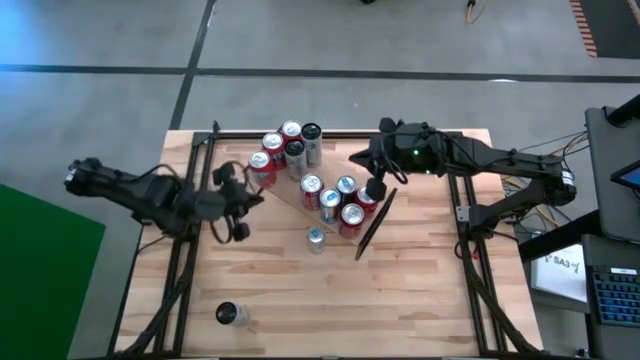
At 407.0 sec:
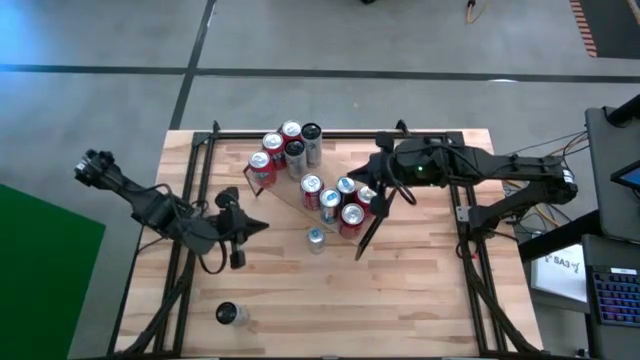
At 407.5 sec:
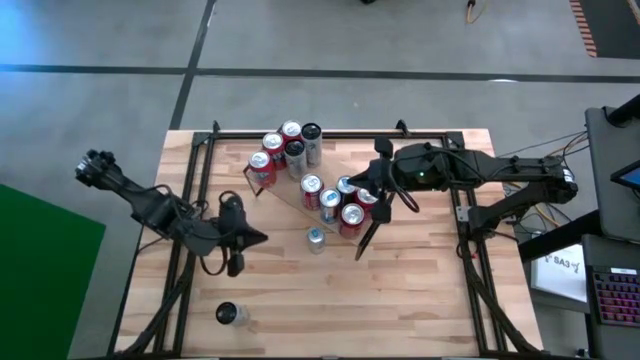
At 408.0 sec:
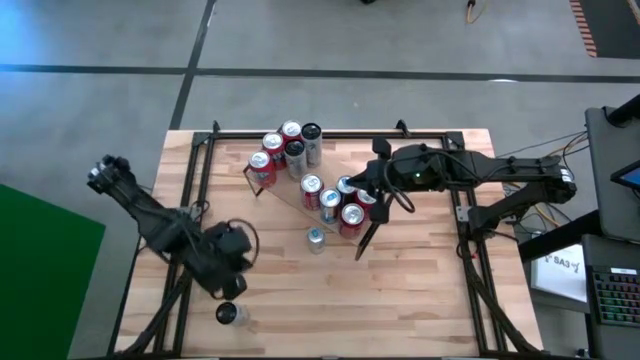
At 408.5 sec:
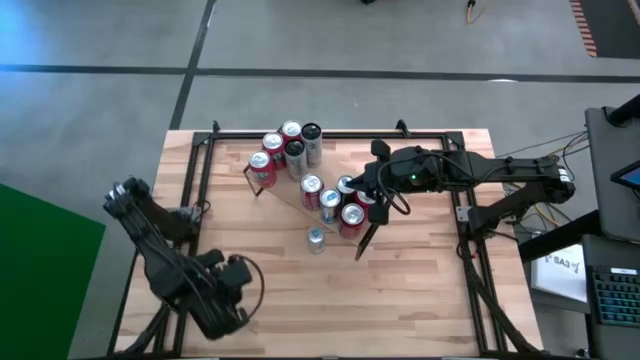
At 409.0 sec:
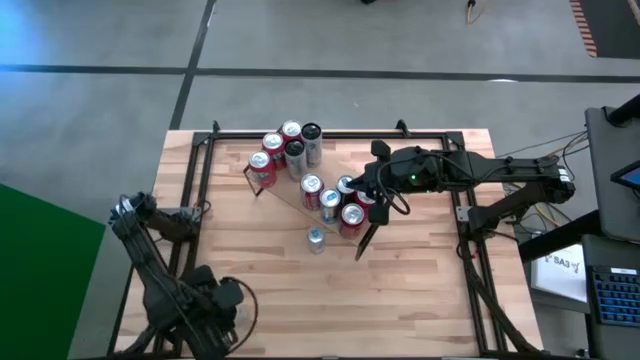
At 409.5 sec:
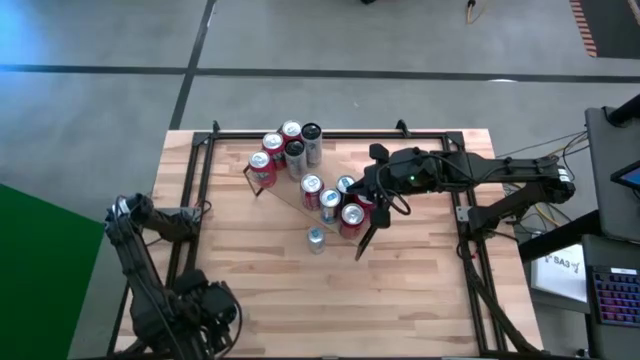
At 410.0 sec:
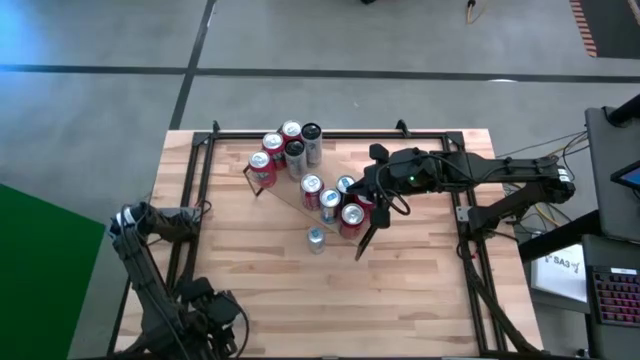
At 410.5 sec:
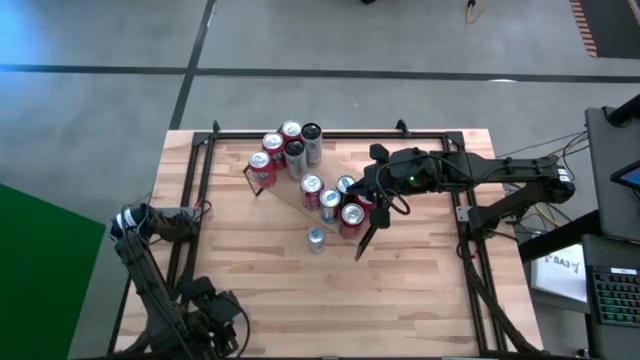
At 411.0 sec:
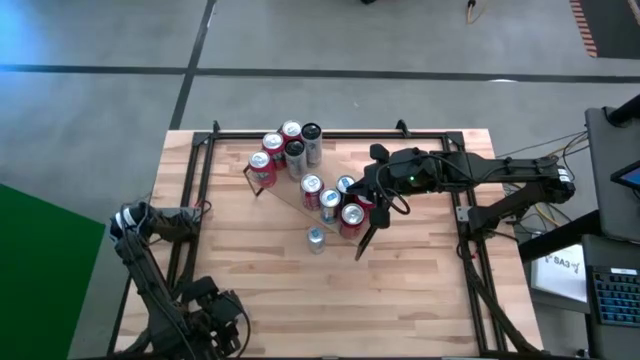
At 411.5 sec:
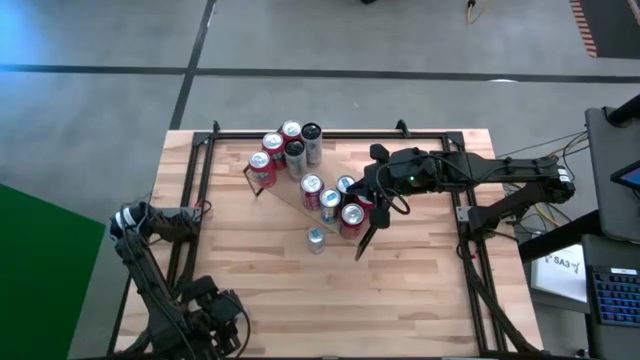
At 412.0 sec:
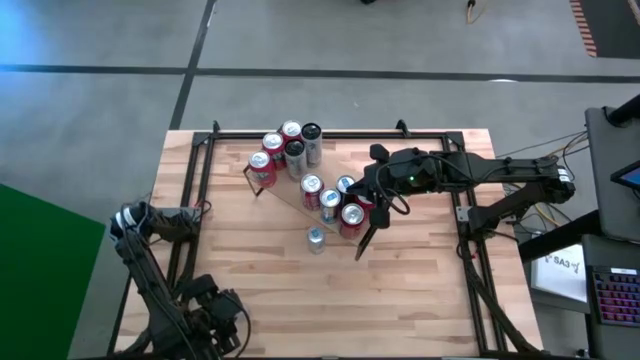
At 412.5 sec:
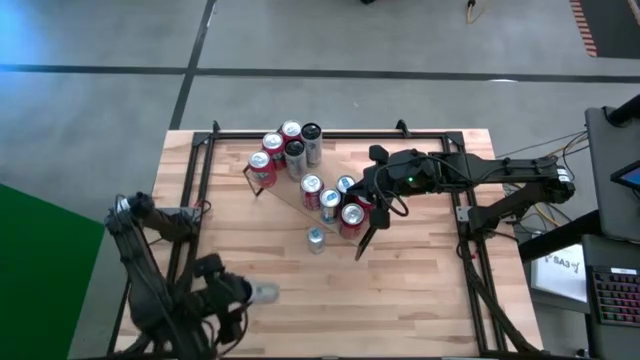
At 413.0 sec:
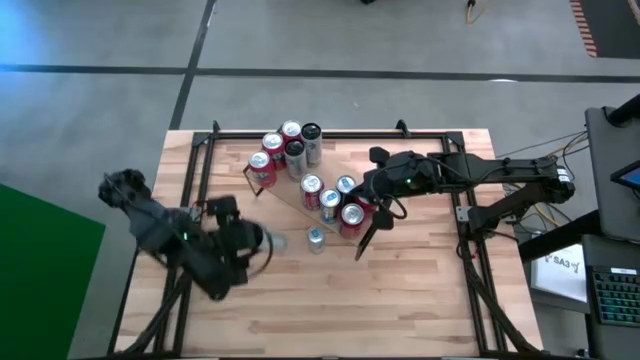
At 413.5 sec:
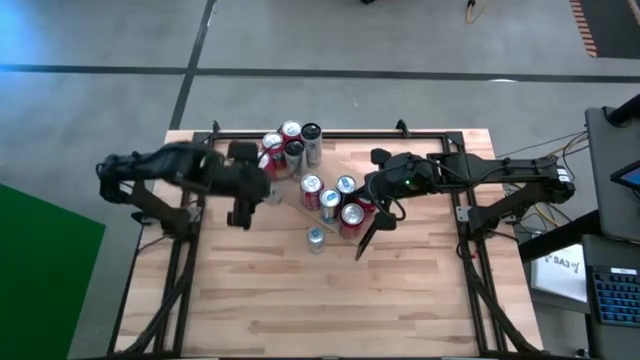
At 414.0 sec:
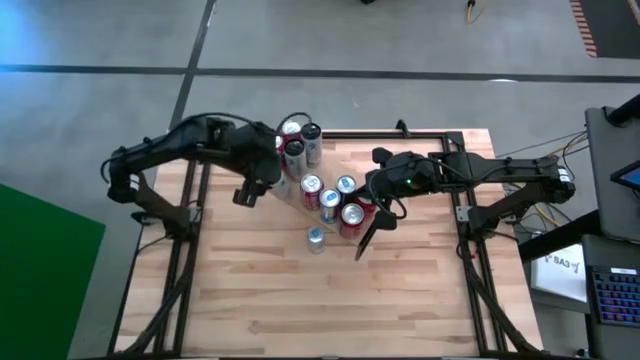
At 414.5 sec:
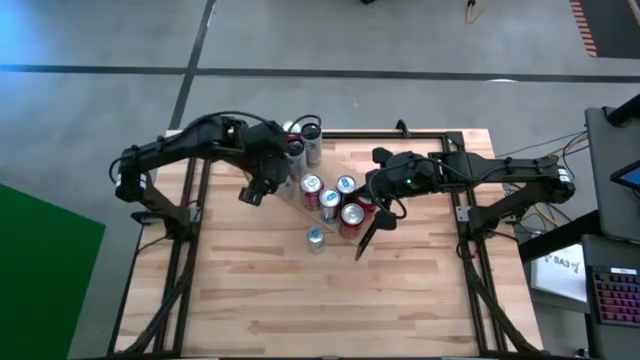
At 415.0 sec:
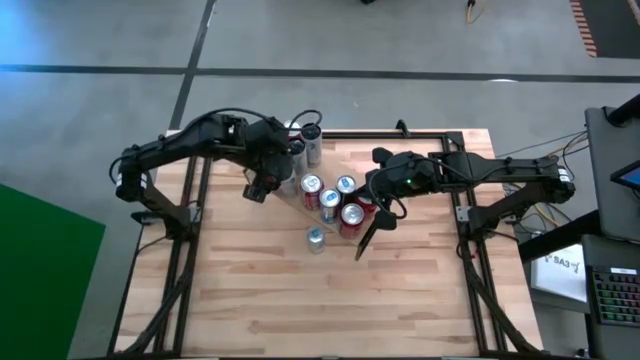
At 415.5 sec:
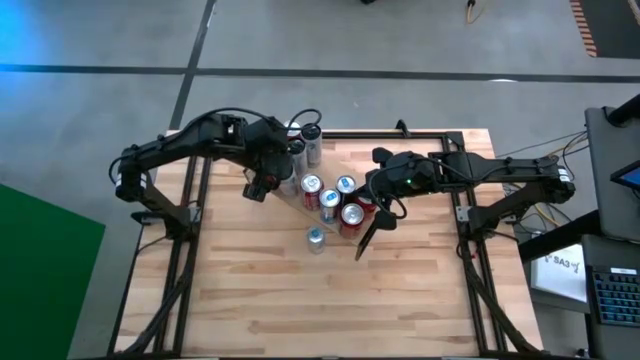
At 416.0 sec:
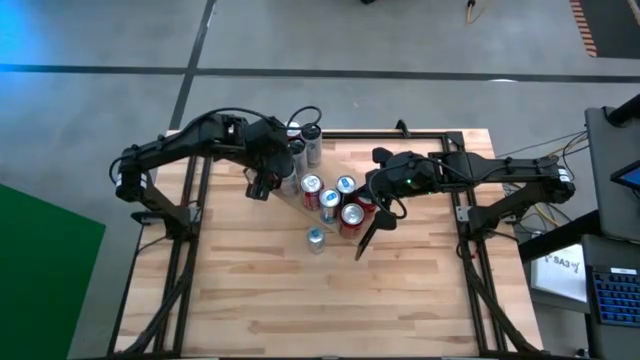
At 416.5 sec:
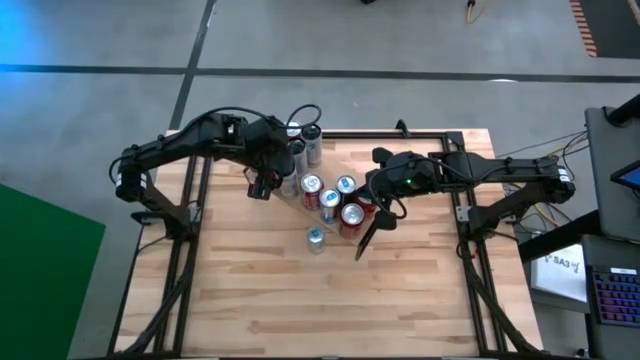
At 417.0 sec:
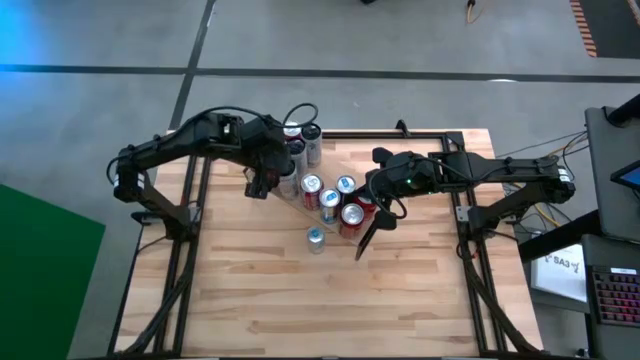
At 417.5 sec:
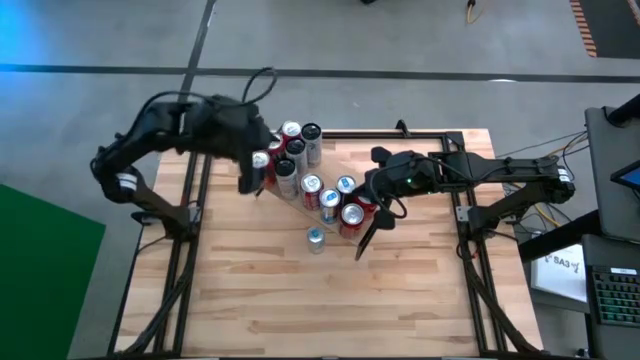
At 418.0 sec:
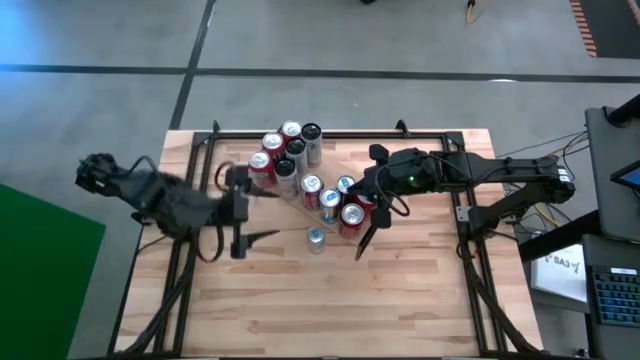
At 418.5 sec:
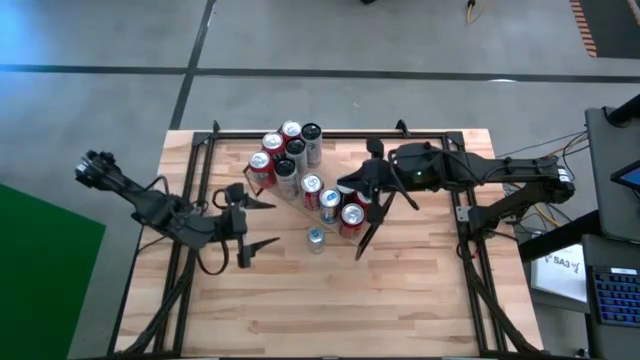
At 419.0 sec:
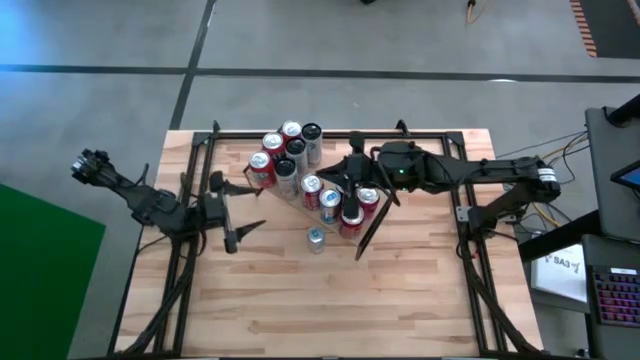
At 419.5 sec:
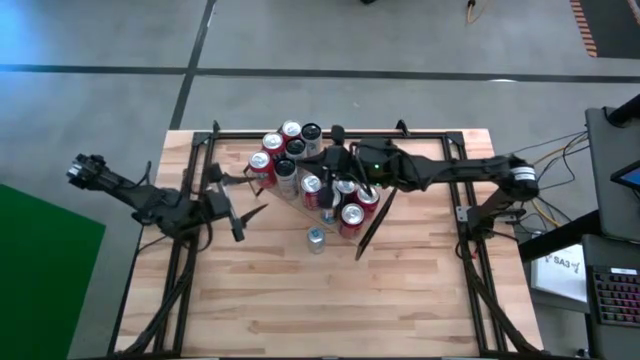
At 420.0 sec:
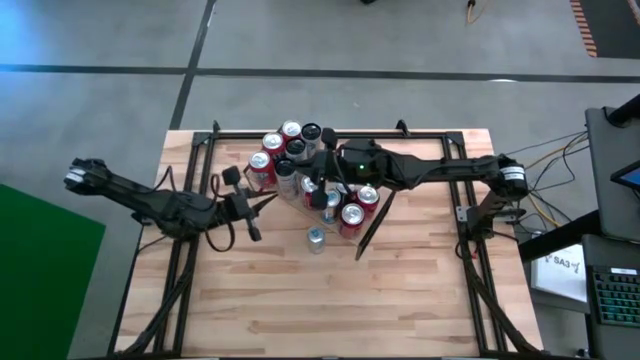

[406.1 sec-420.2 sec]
Task: Place canned beverage on shelf
Put the white/pink soda can on the shelf, align with the other white/pink soda cans

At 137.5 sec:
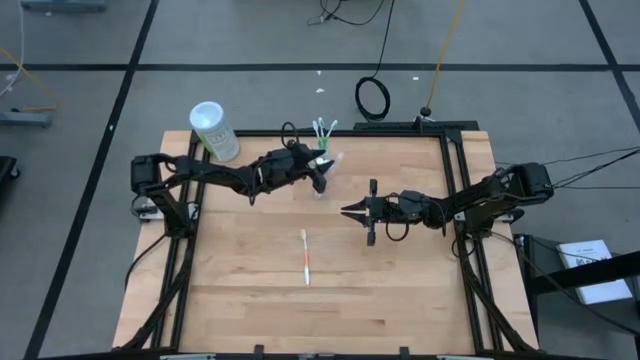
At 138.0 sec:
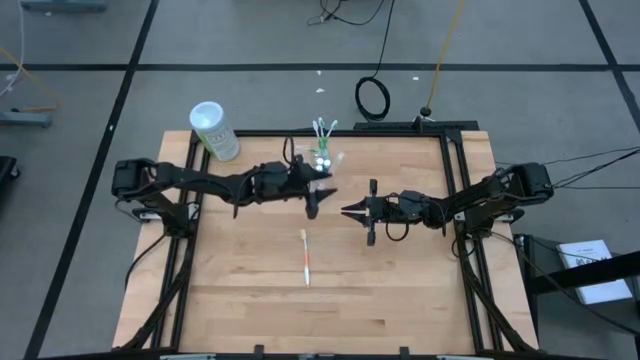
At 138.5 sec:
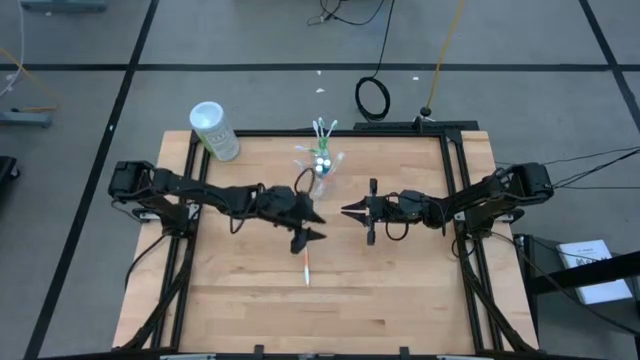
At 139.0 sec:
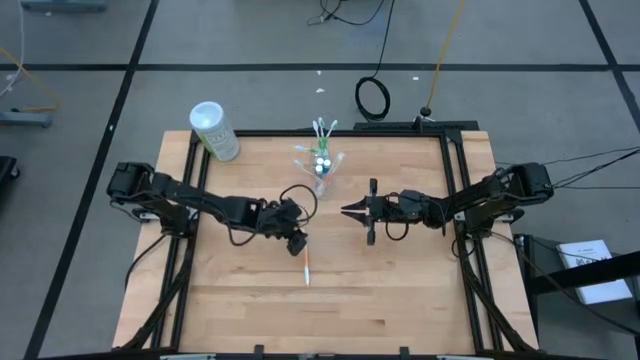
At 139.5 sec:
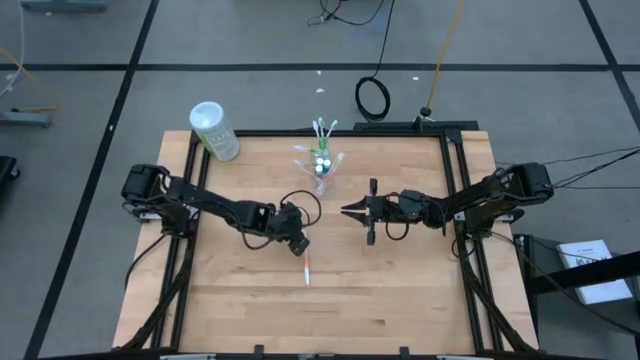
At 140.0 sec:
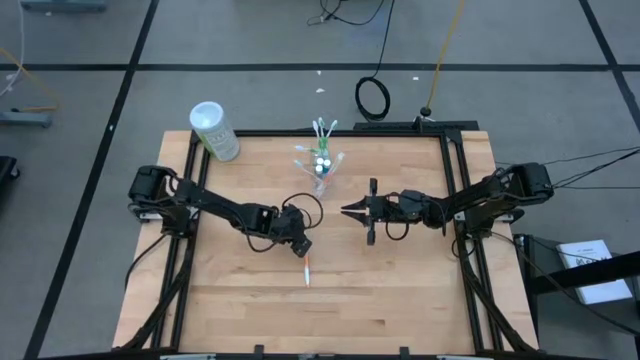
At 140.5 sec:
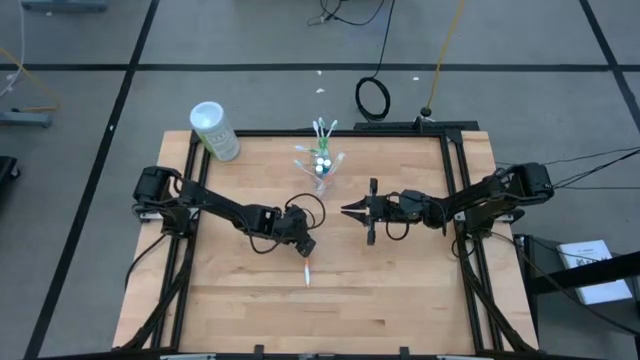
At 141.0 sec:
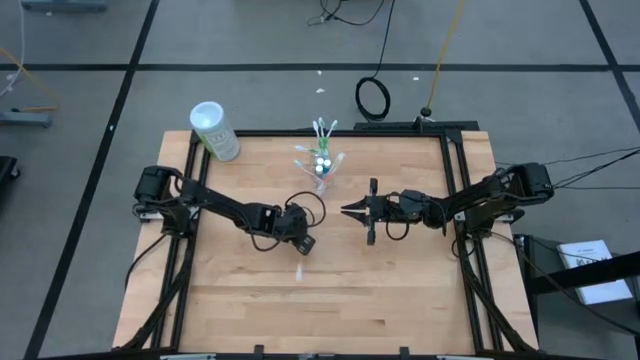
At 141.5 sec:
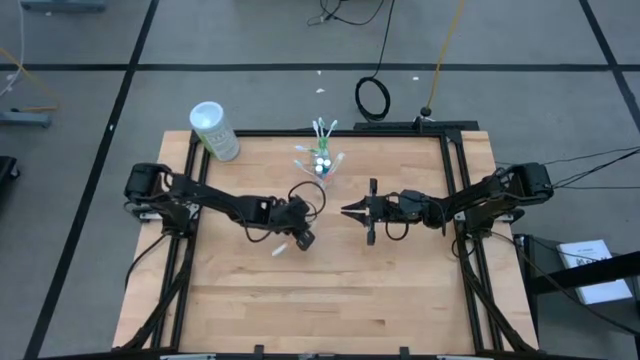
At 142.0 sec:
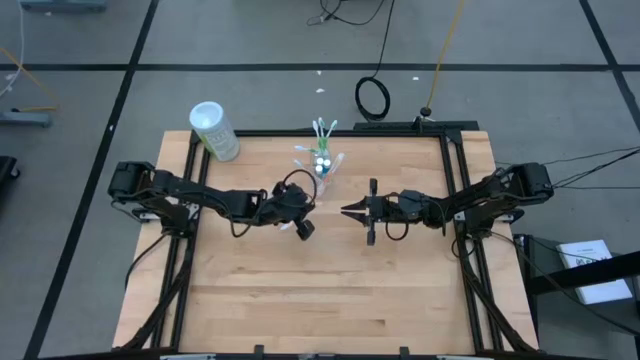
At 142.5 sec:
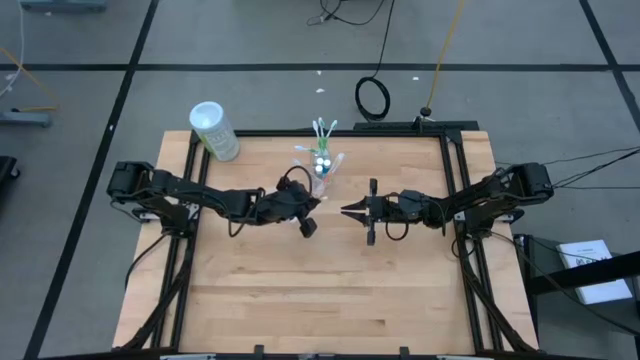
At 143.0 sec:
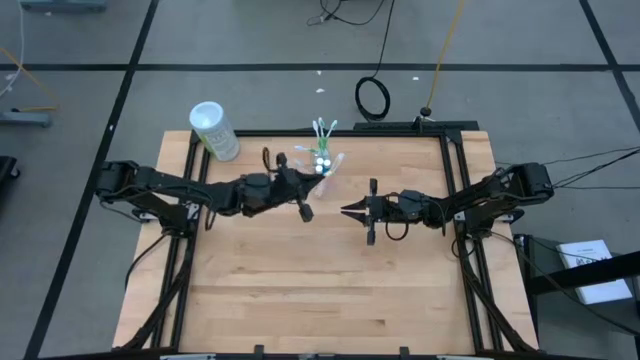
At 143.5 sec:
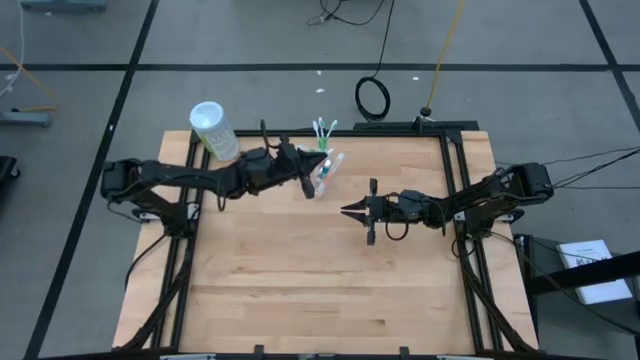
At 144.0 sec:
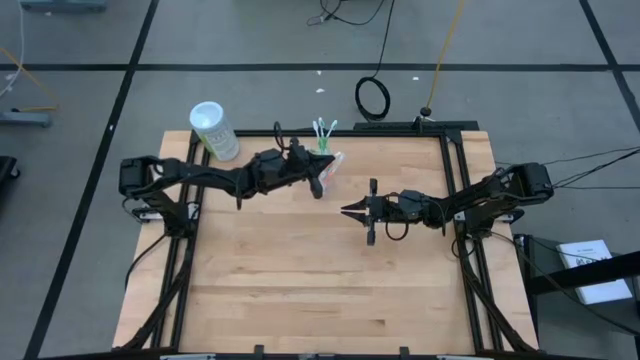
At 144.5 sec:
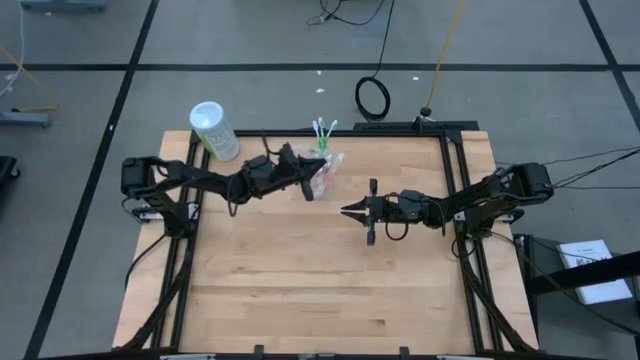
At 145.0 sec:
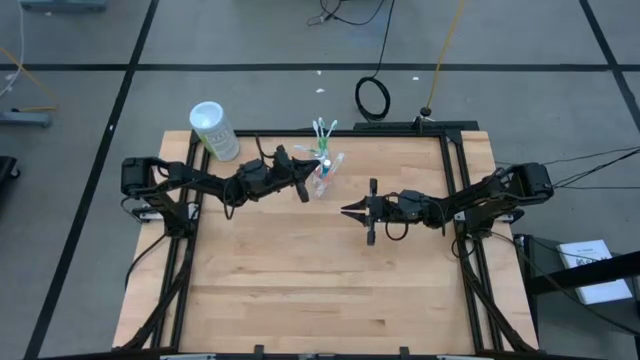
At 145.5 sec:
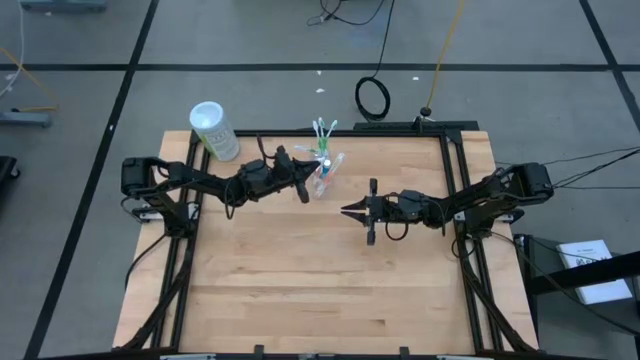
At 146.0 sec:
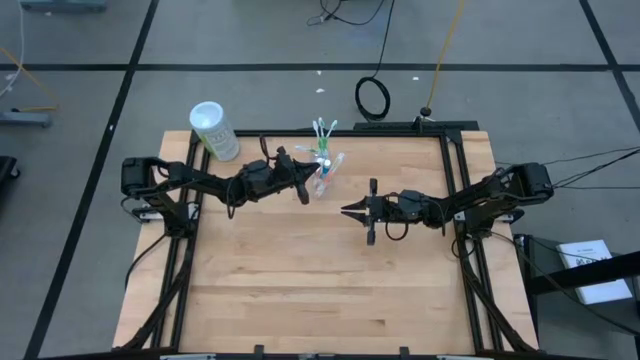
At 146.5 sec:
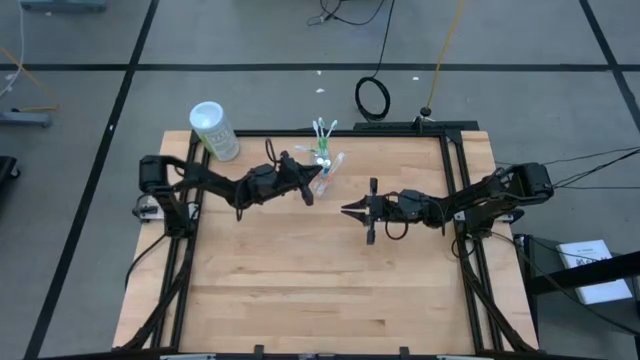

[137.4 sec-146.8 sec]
Task: Pick & Place toothbrushing station
Put the orange toothbrush into the transparent organizer
